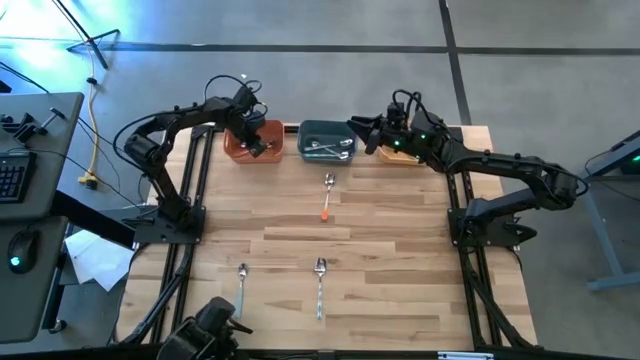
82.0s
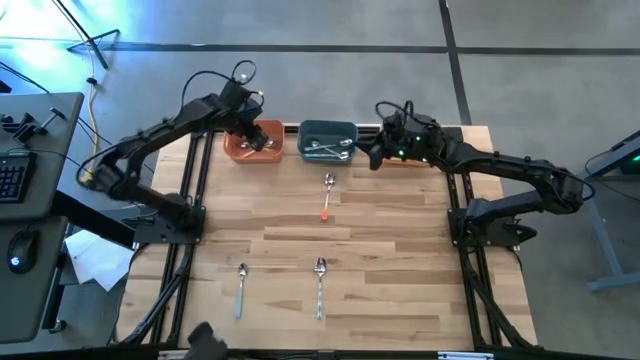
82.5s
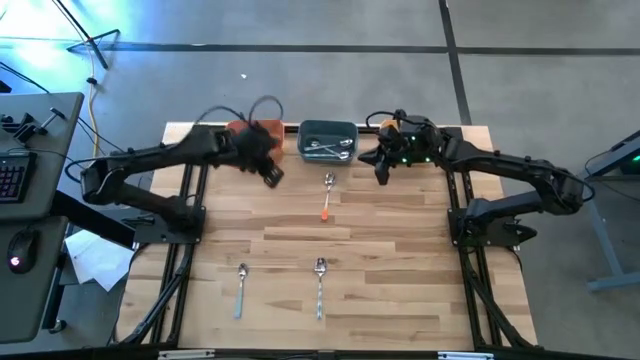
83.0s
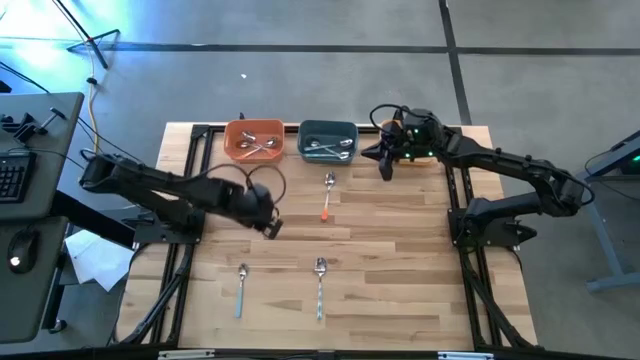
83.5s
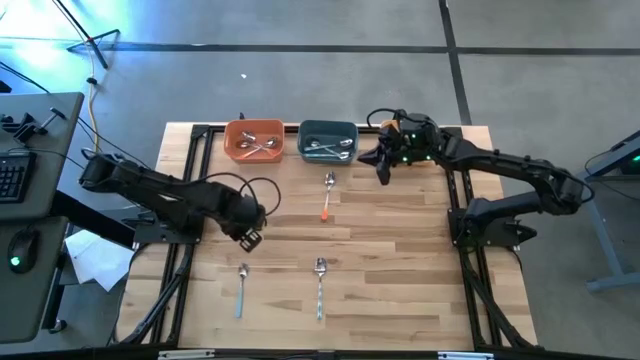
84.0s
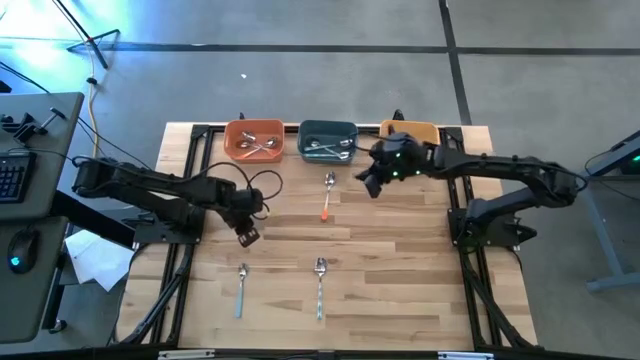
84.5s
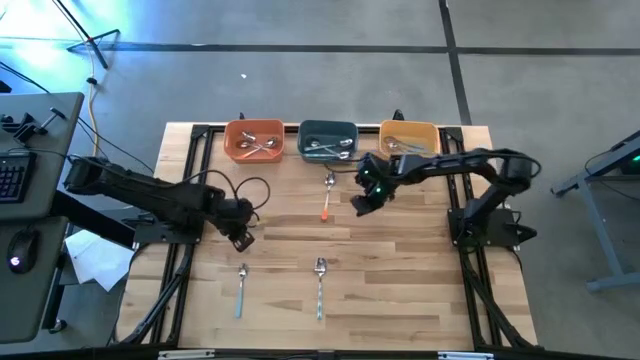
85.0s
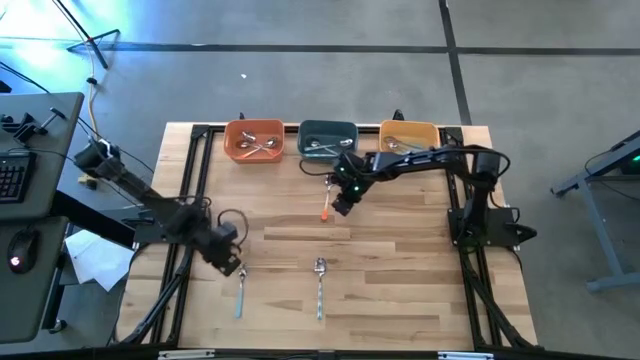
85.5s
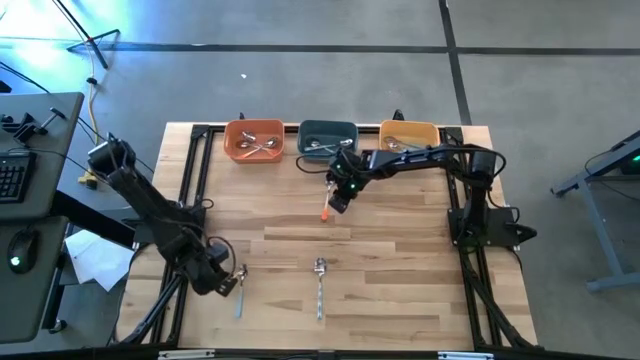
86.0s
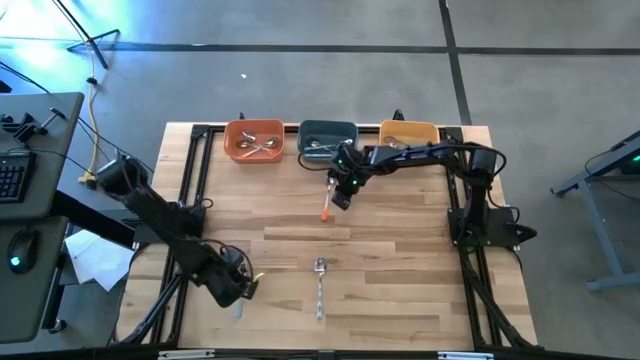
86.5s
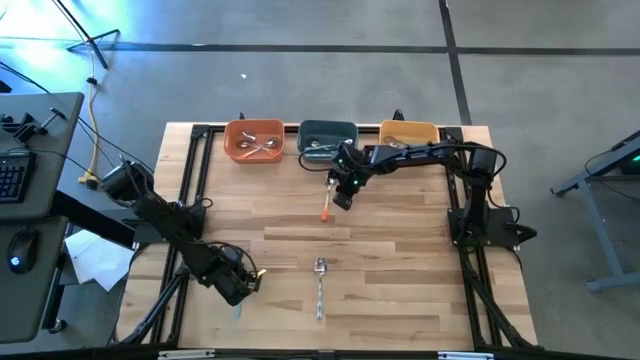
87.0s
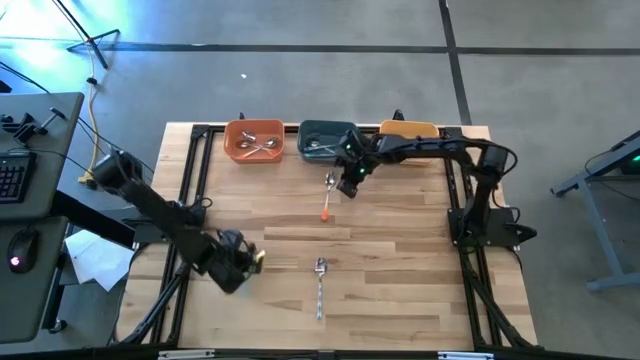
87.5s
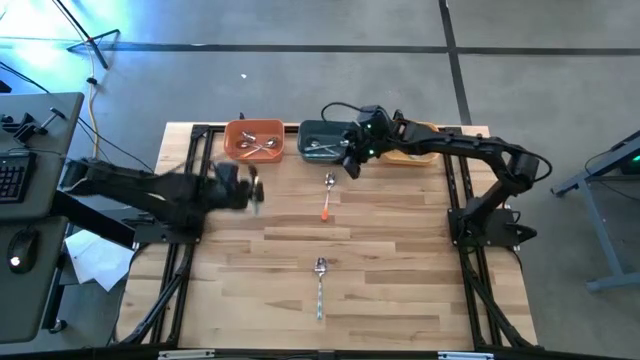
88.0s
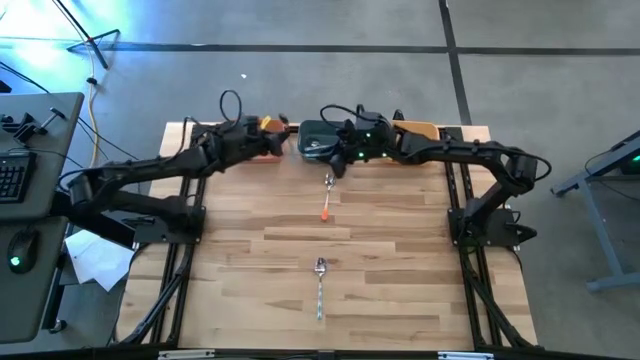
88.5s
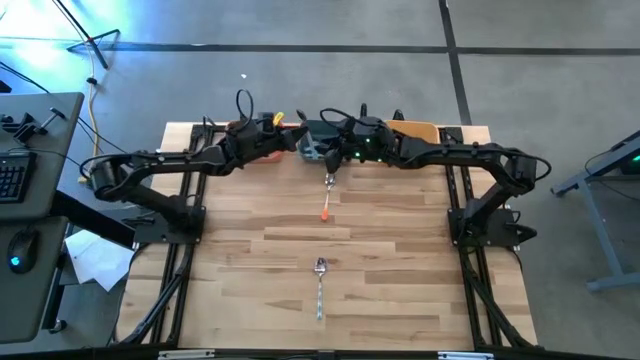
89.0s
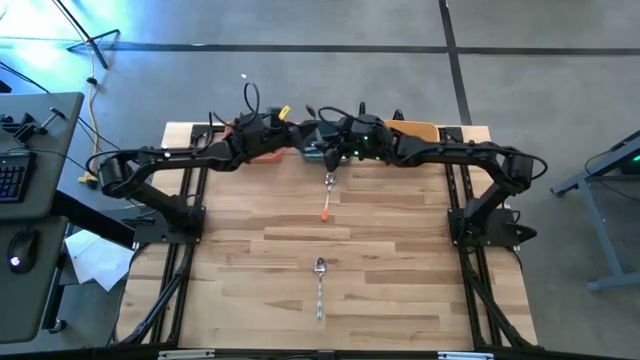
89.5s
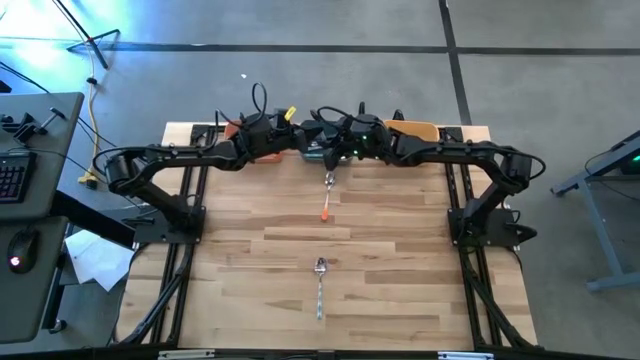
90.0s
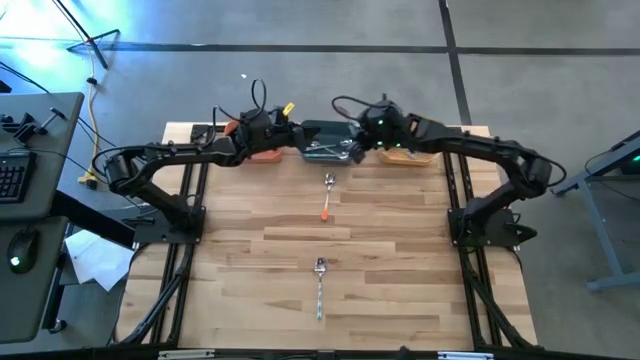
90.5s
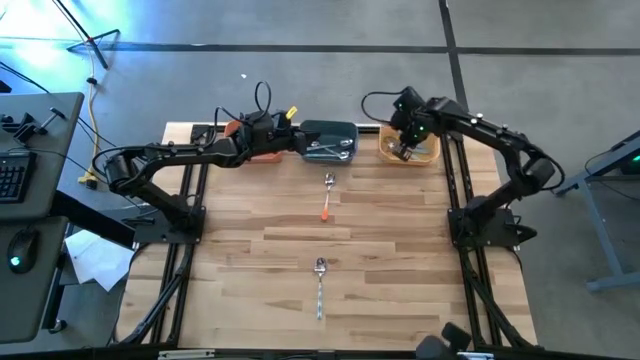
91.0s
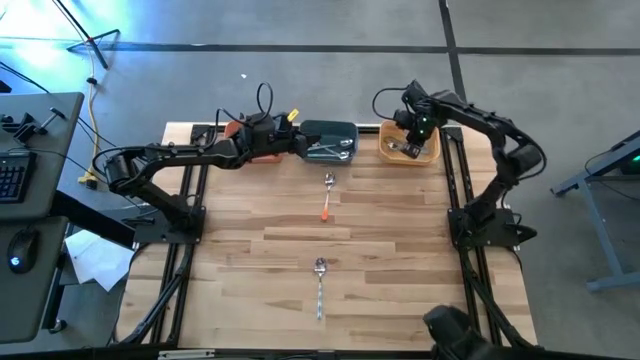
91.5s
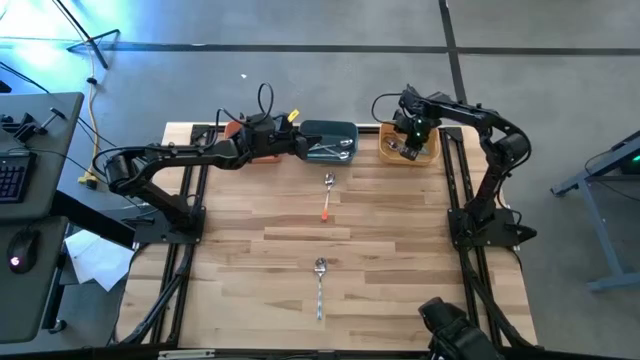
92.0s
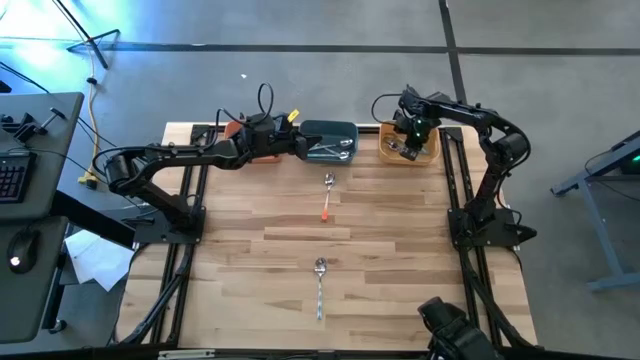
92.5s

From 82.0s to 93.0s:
Task: Sort silverware by color (type)
Put the blue spoon into the yellow bin

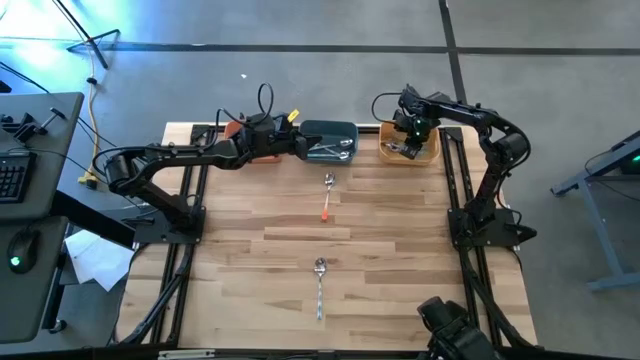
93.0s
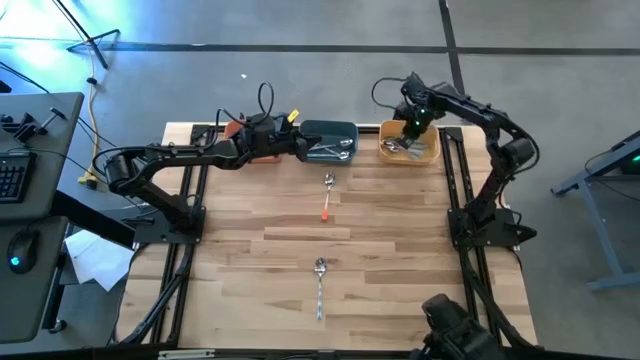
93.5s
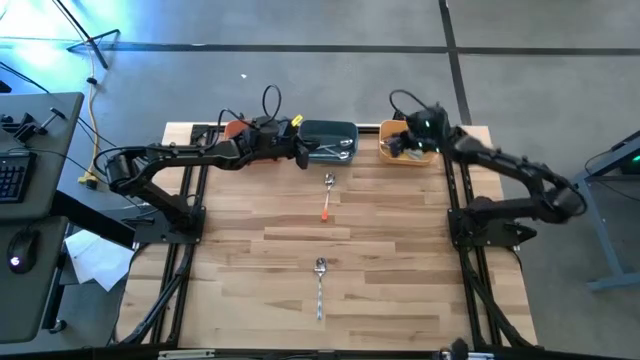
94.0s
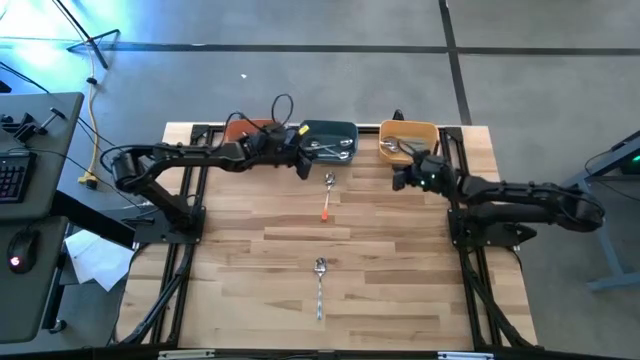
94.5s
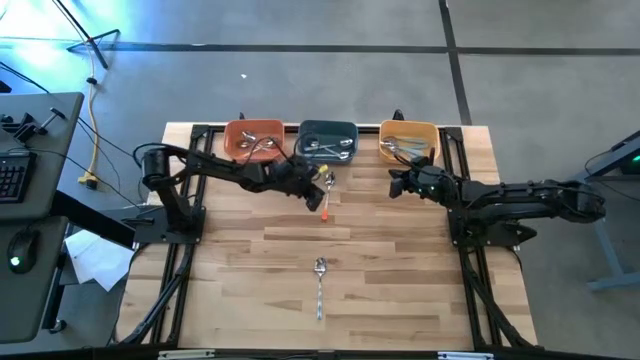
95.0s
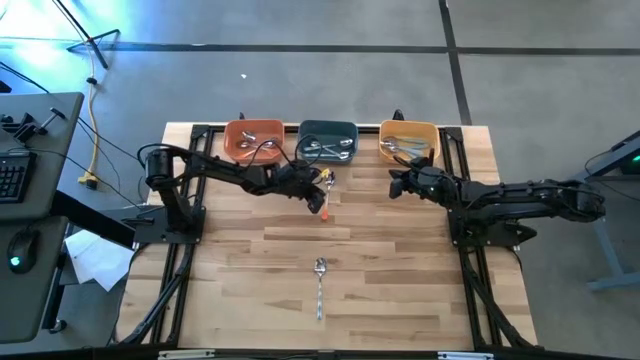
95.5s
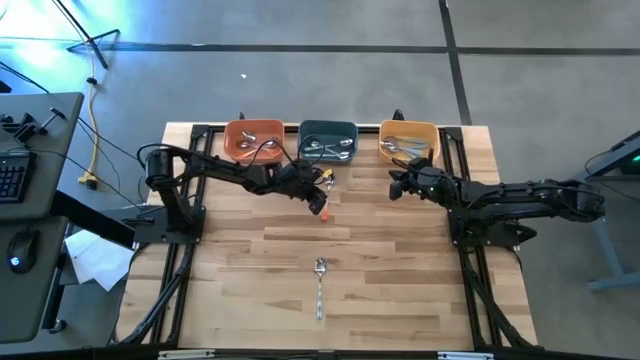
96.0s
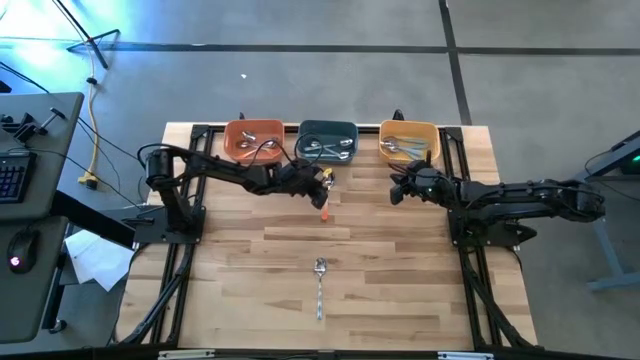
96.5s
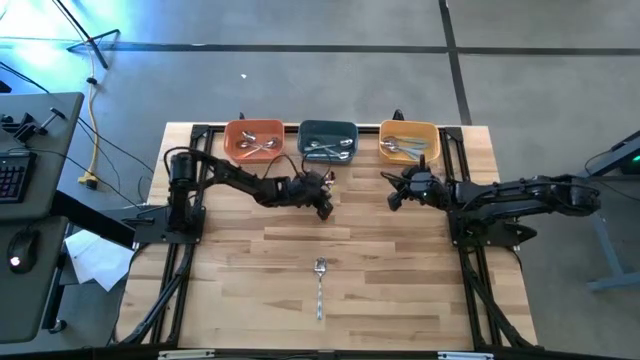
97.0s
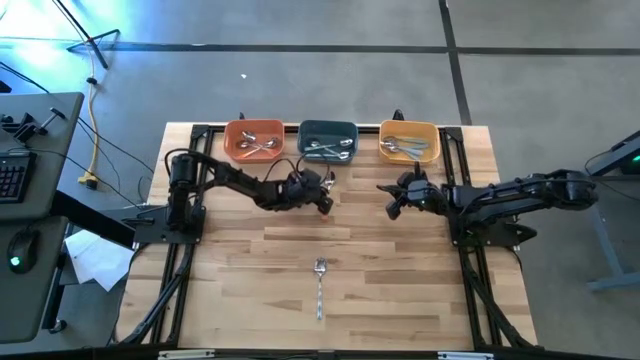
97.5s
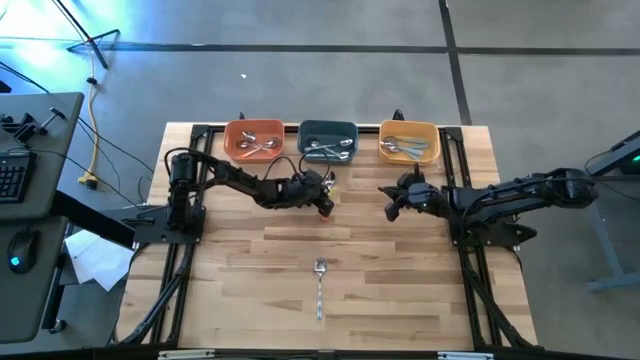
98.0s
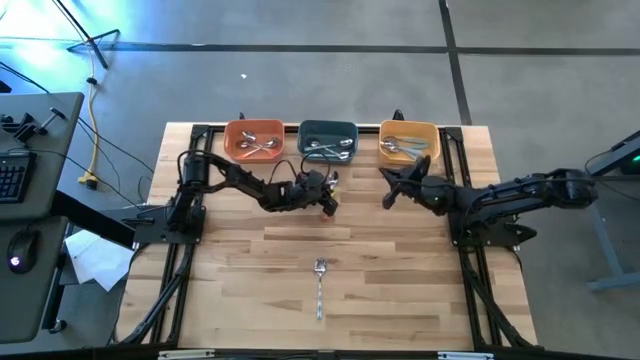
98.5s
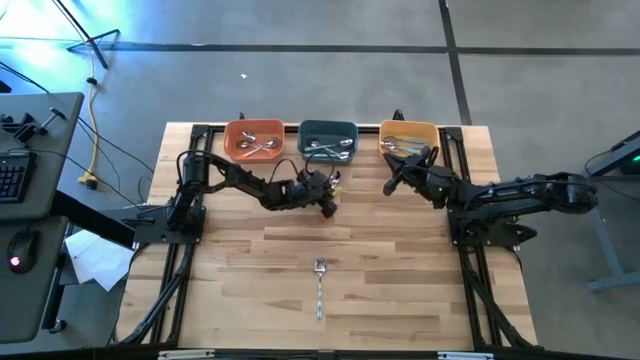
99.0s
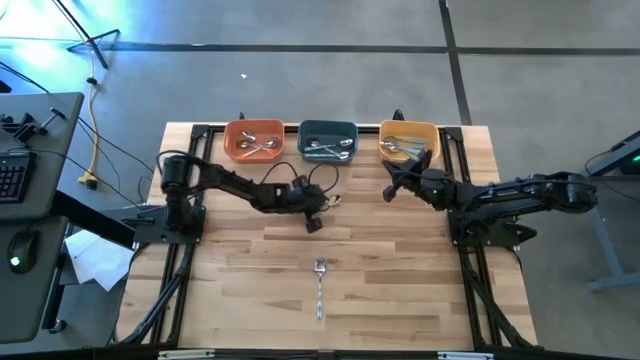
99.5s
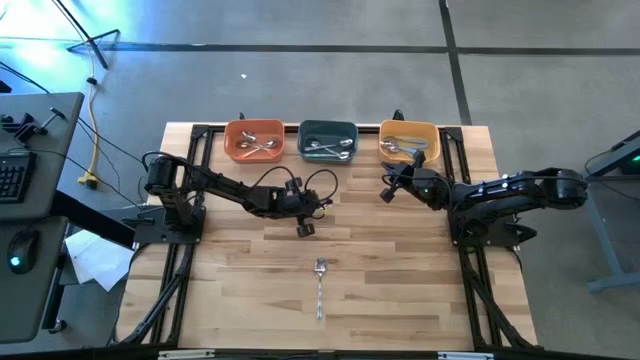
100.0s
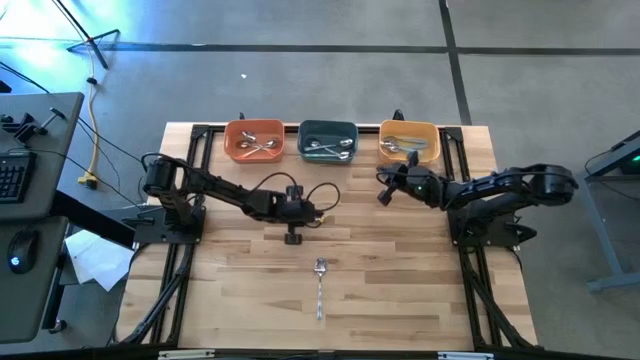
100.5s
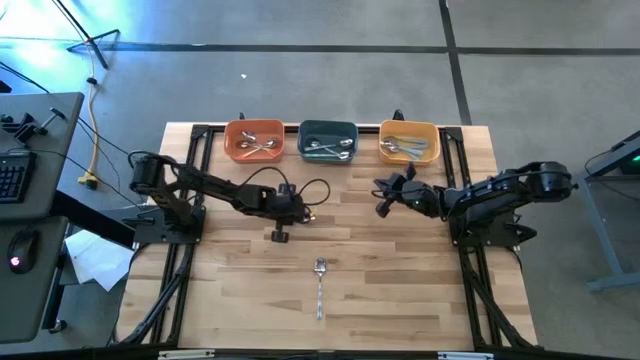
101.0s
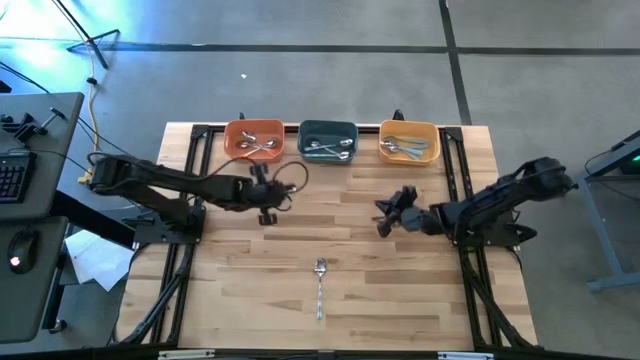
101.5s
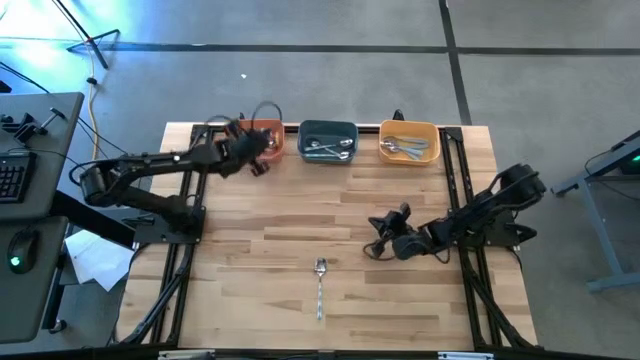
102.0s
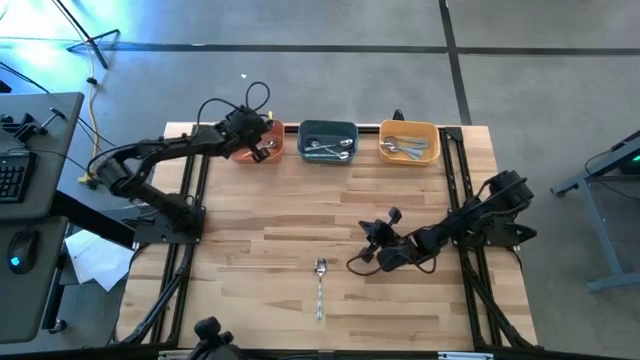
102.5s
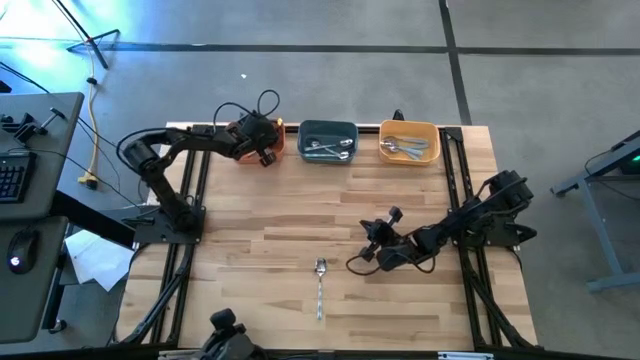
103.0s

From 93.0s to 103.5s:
Put the orange spoon into the orange bin
